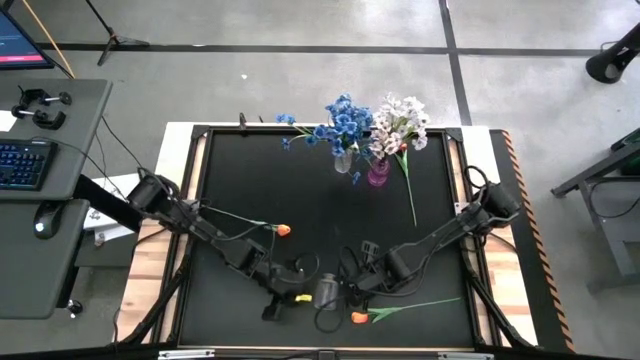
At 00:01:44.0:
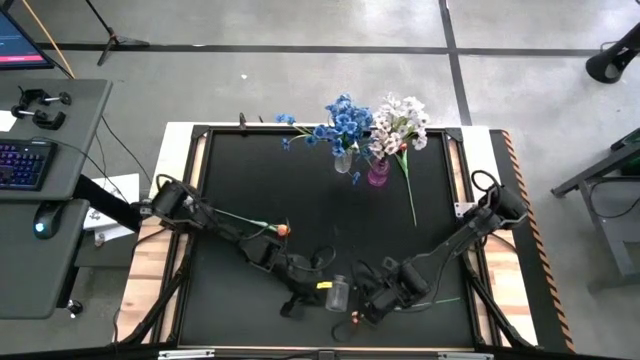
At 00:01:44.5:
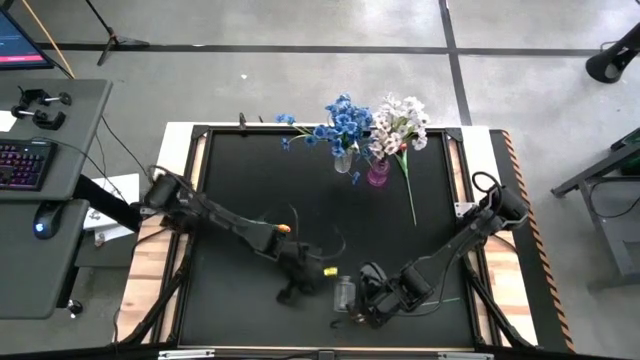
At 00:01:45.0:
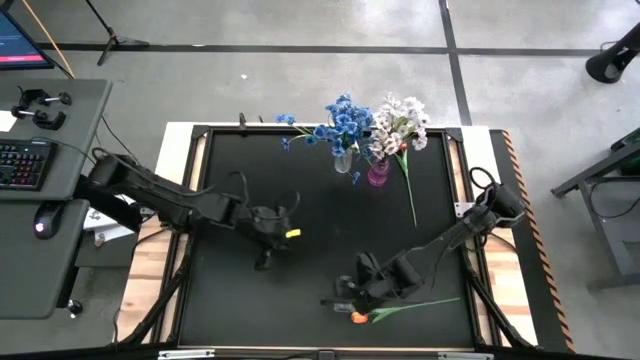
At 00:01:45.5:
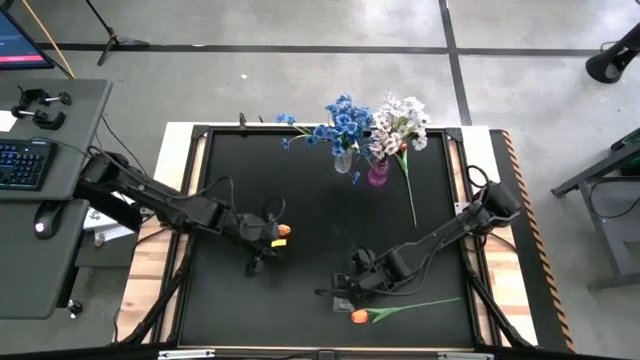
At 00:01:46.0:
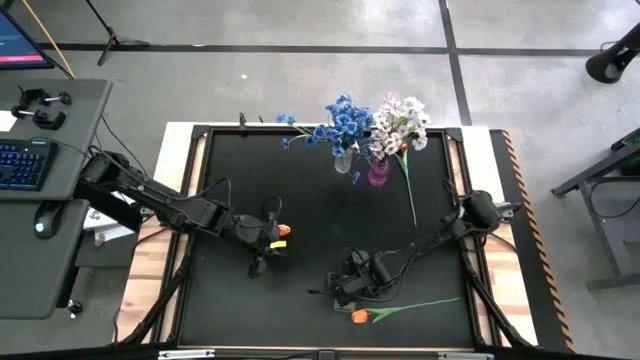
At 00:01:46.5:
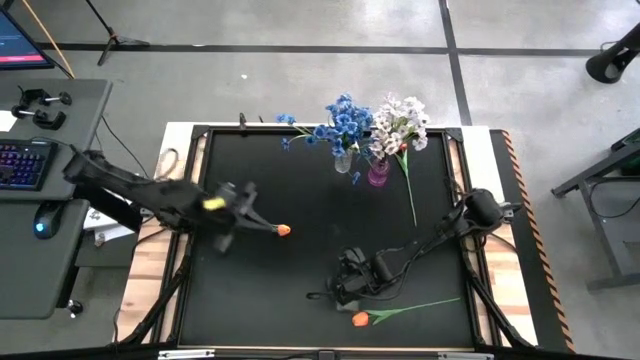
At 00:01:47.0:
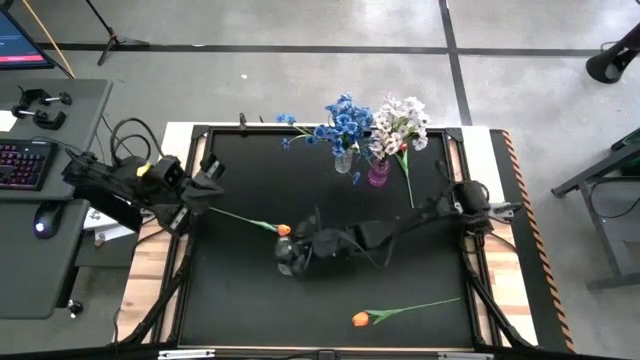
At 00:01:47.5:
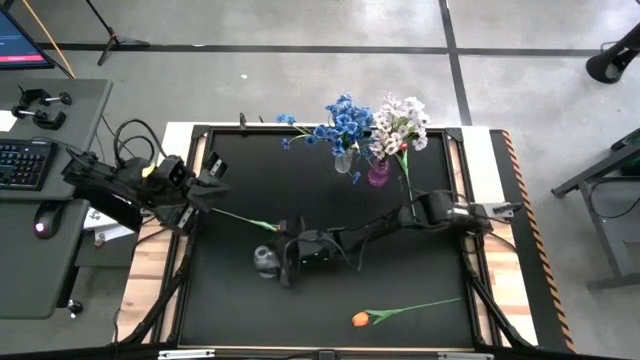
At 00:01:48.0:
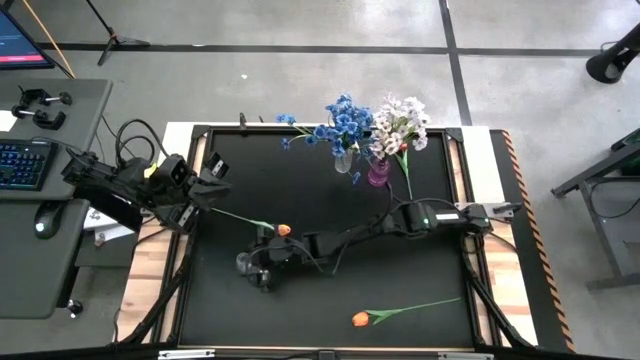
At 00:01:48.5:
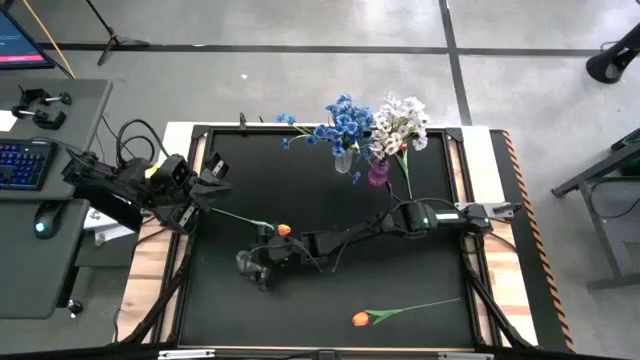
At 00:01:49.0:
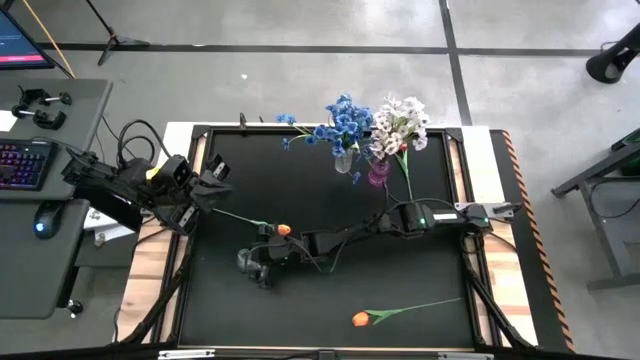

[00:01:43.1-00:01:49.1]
Task: Sort flowers into vase by color
Move the bottom transparent vase to the center table

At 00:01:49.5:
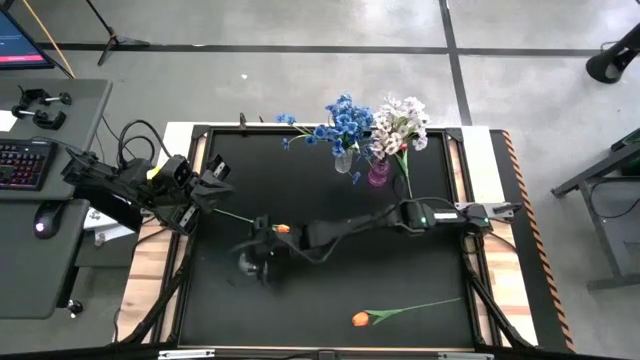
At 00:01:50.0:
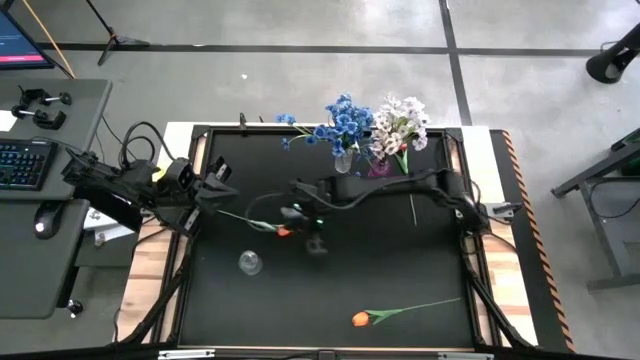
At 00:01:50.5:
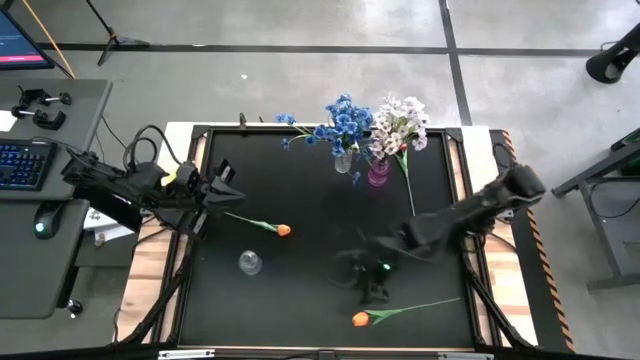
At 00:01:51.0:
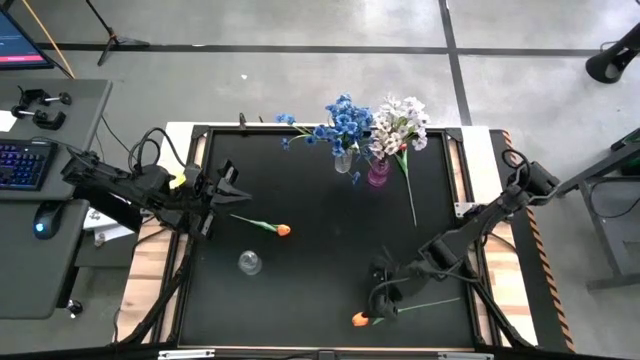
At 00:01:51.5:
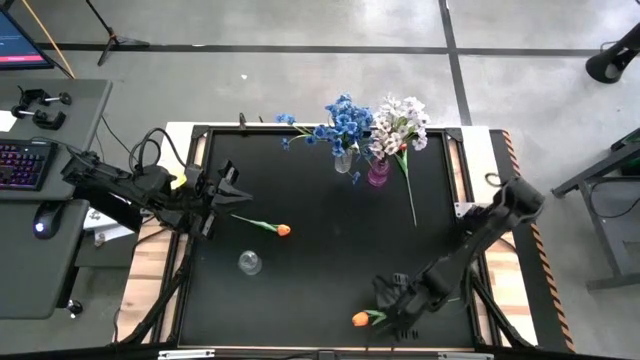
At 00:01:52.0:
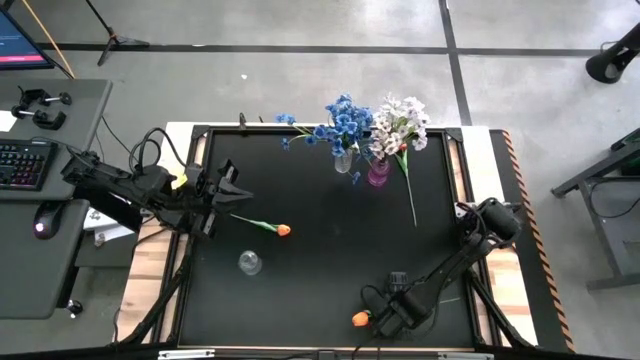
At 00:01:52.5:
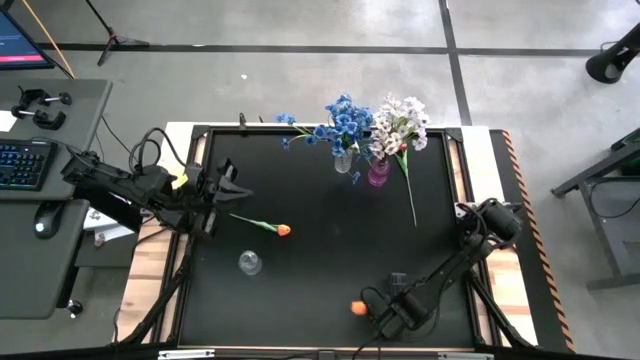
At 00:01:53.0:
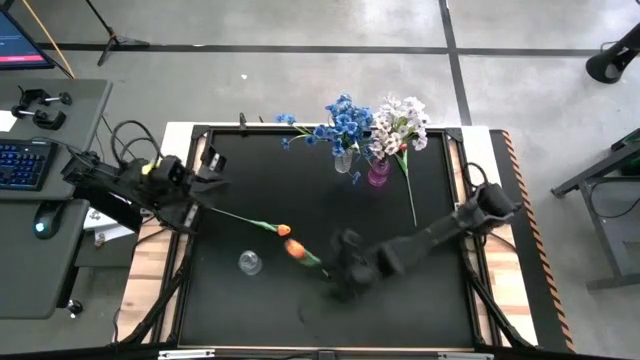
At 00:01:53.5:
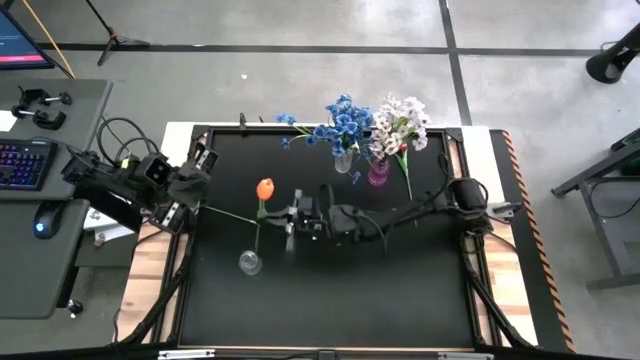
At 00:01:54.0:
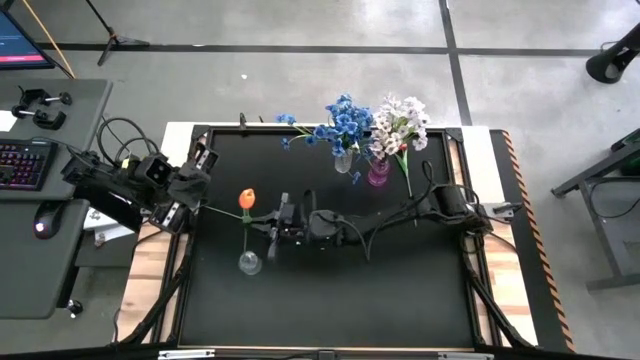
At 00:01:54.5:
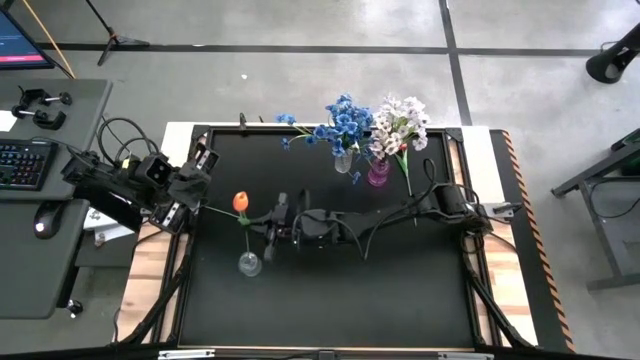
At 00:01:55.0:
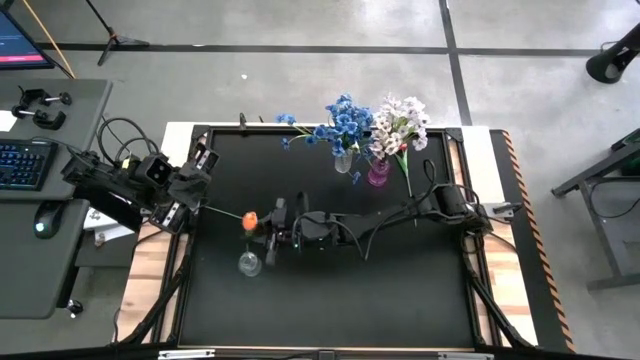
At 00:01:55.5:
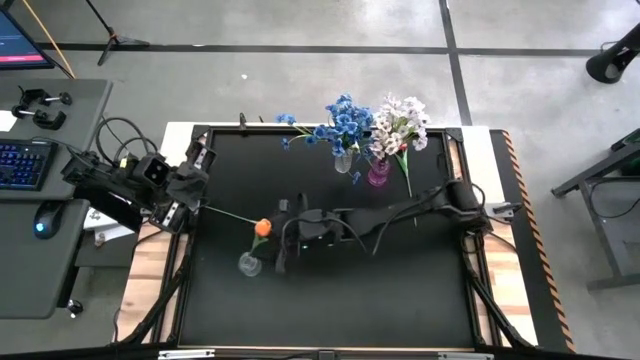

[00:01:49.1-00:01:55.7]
Put the bottom right orange flowers into the bottom transparent vase

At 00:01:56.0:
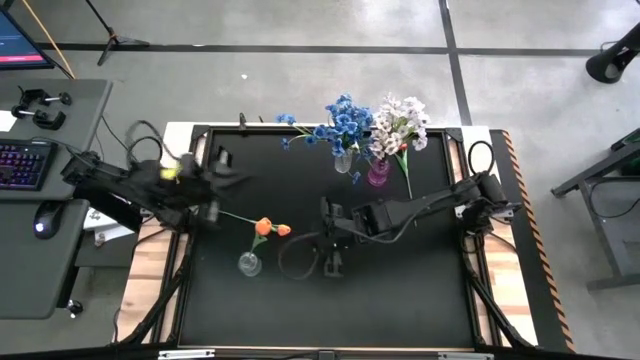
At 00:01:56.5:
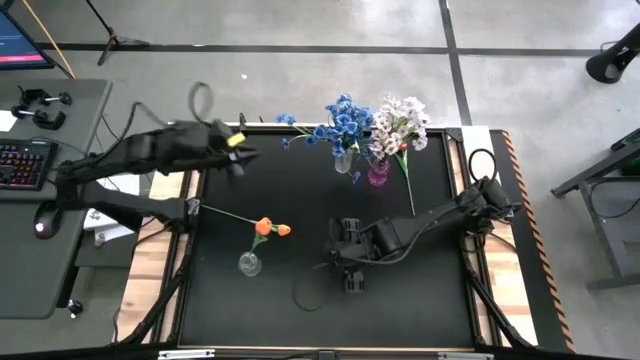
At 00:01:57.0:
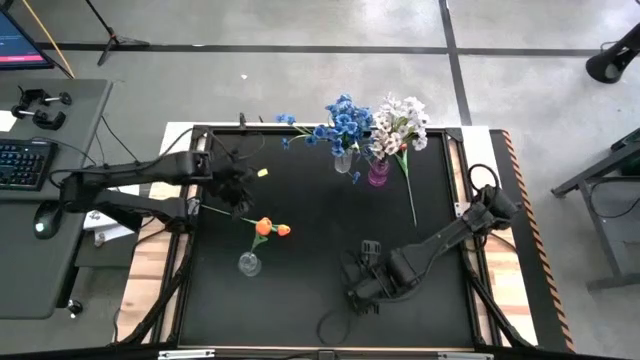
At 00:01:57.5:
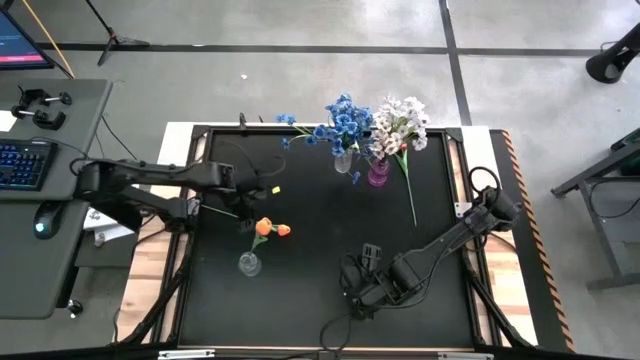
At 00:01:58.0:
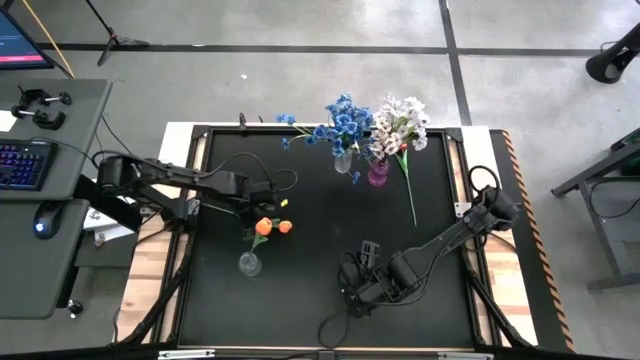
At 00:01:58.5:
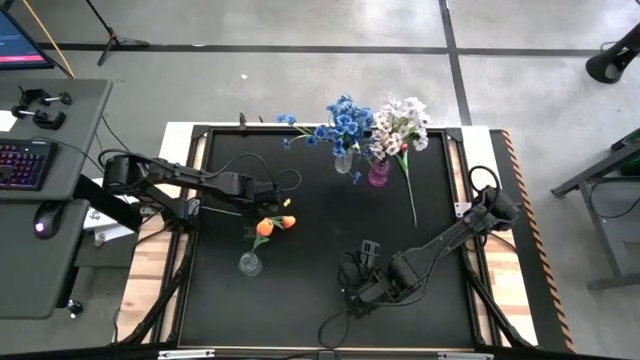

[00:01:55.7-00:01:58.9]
Put the left orange flowers into the bottom transparent vase

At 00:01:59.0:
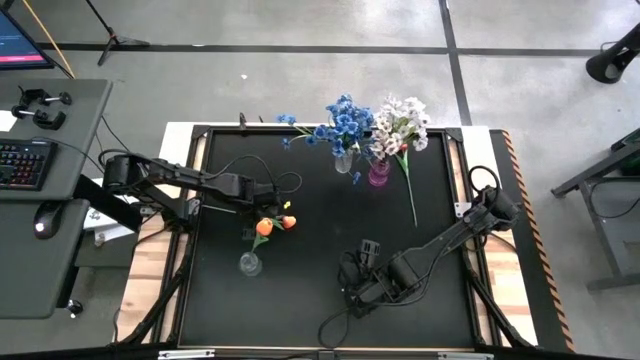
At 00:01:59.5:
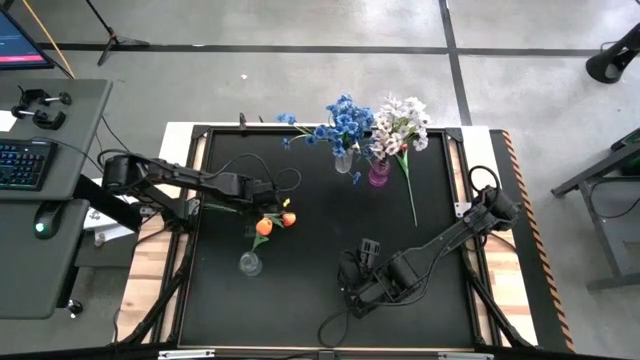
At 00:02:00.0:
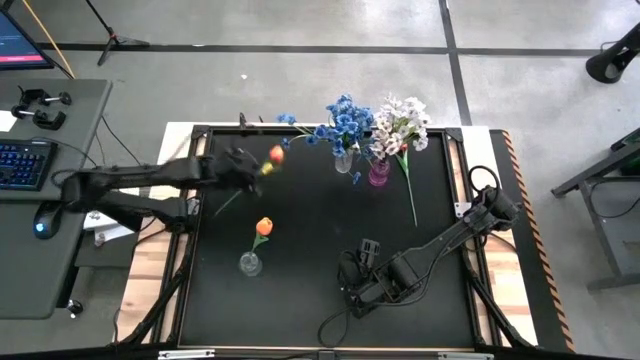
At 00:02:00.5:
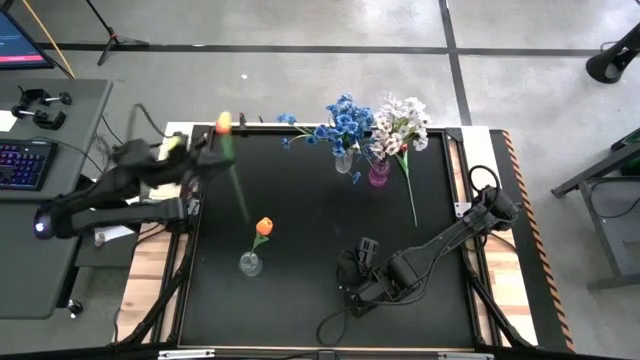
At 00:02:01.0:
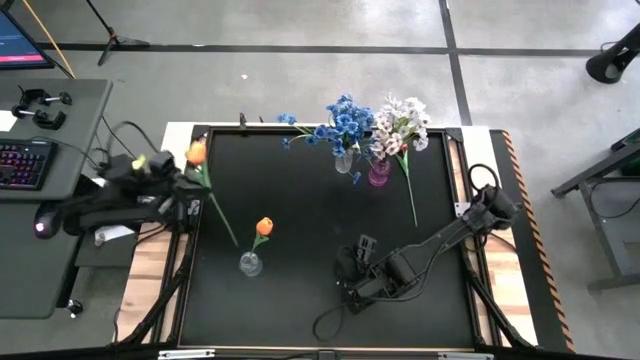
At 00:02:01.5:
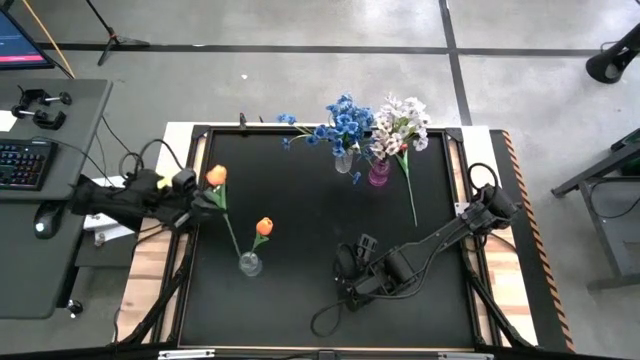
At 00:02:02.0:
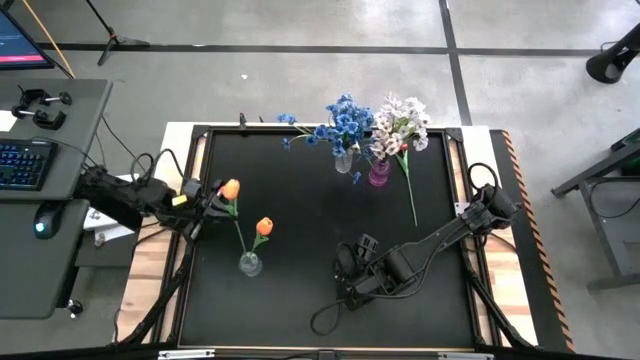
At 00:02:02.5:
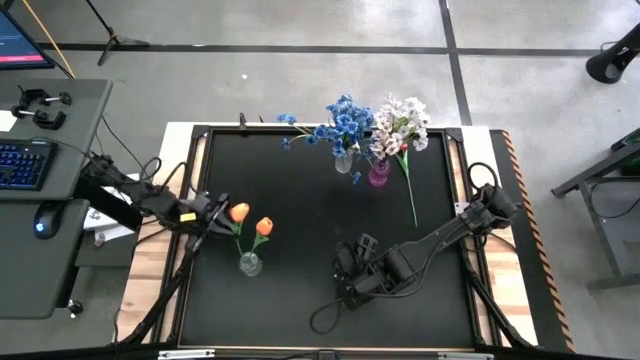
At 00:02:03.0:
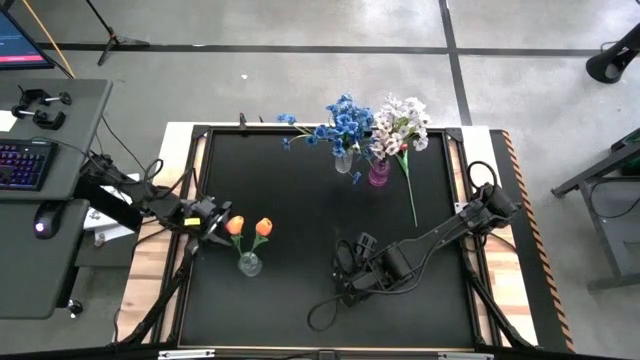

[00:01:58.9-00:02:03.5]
Put the left orange flowers into the bottom transparent vase

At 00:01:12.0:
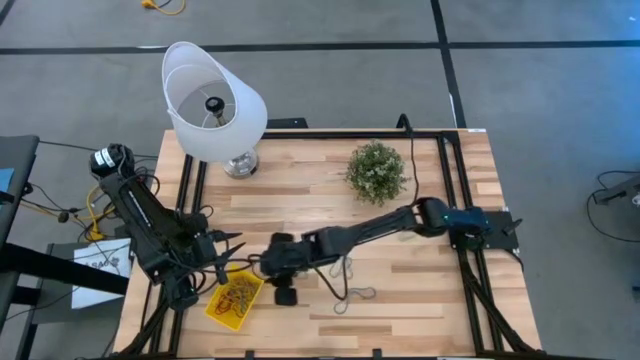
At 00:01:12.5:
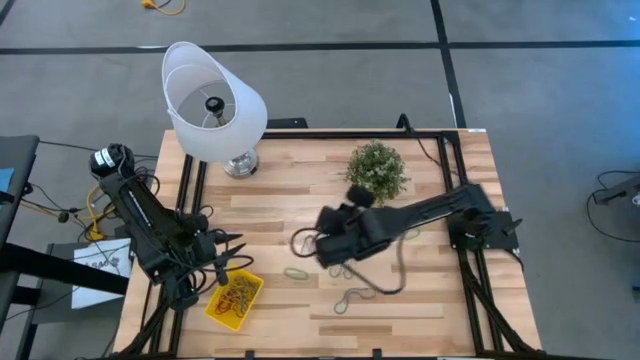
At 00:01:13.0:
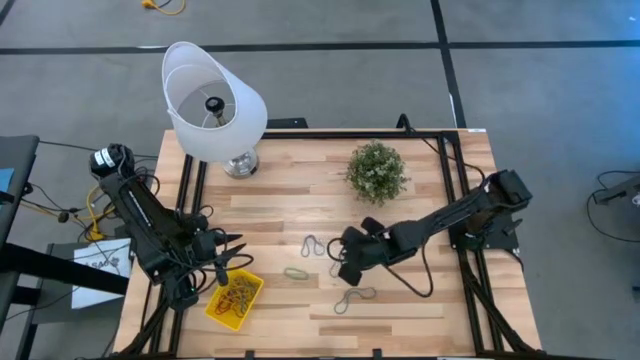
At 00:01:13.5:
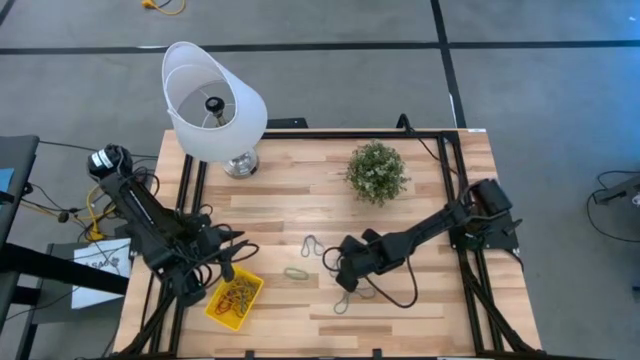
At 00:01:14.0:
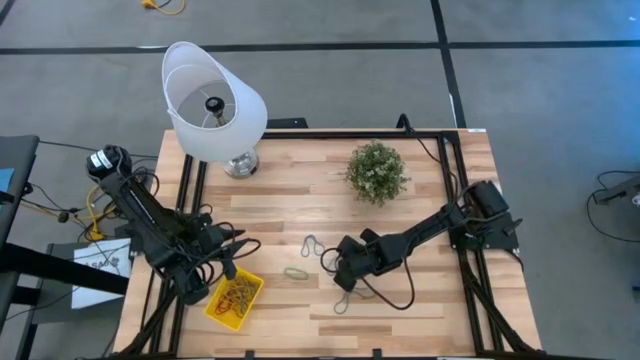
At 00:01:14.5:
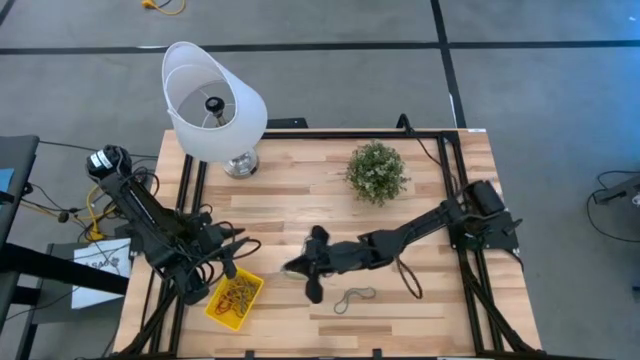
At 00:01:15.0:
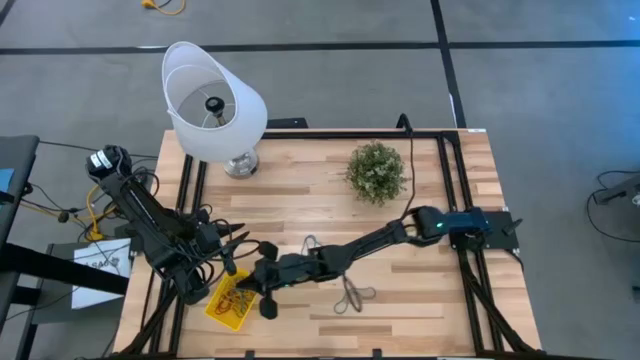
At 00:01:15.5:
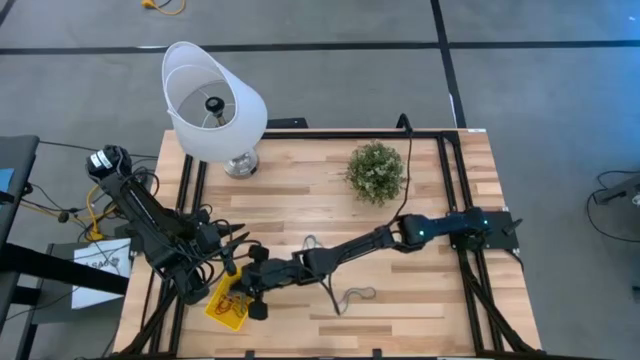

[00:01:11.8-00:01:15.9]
Task: Pick and place items into bin
Put the center blue rubberband into the yellow bin
